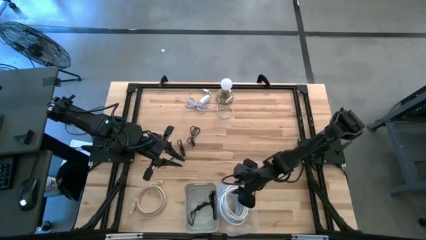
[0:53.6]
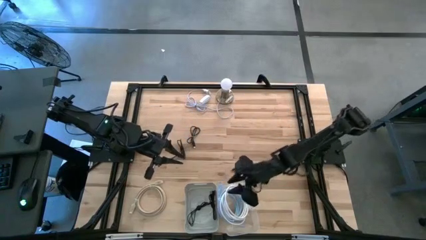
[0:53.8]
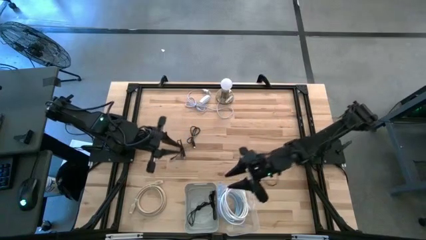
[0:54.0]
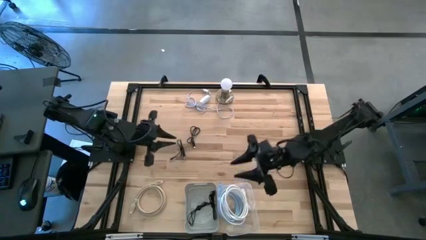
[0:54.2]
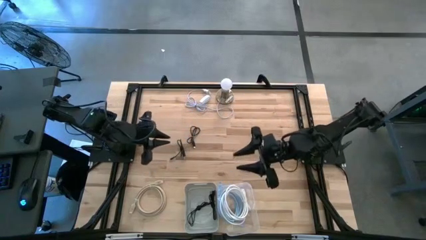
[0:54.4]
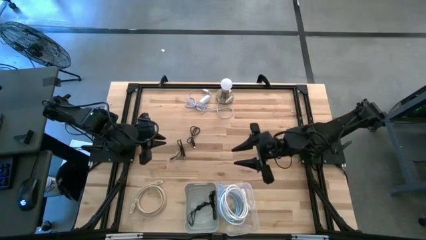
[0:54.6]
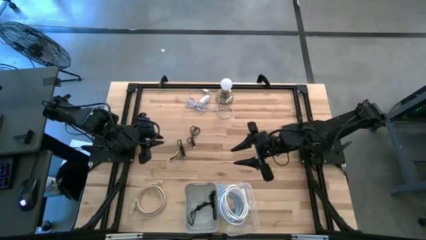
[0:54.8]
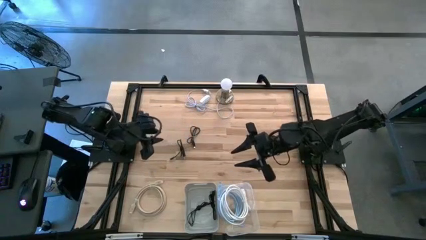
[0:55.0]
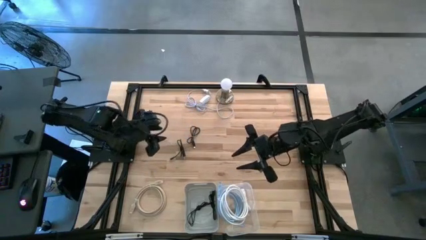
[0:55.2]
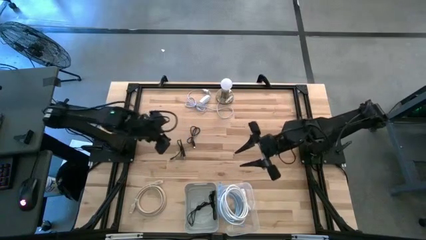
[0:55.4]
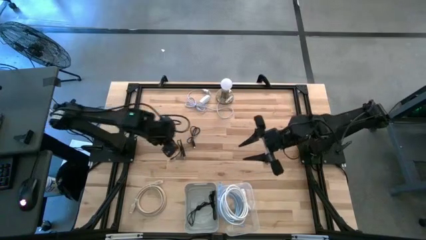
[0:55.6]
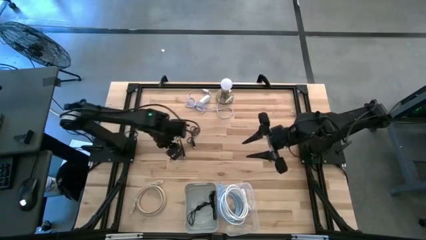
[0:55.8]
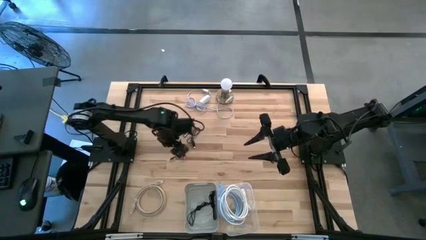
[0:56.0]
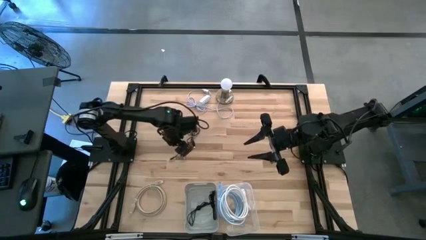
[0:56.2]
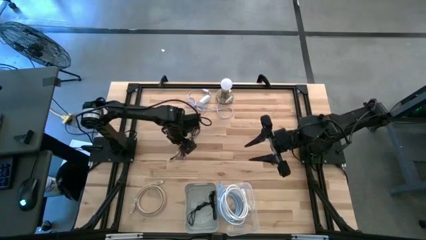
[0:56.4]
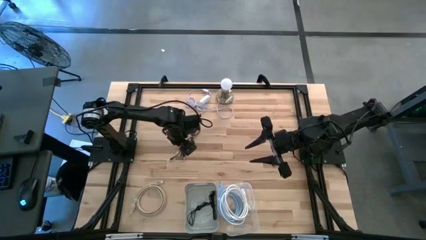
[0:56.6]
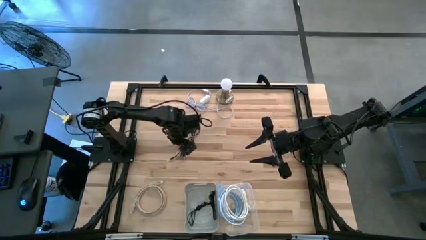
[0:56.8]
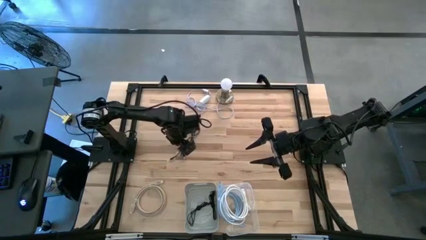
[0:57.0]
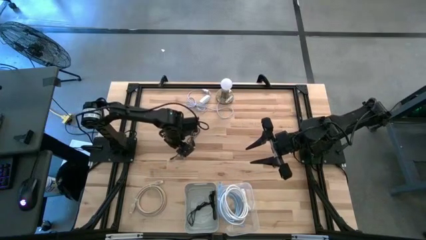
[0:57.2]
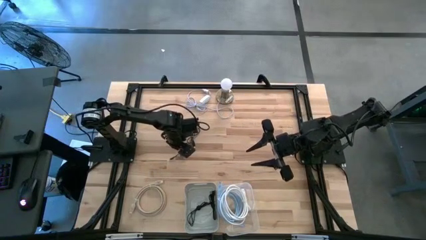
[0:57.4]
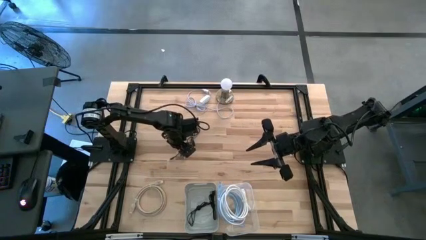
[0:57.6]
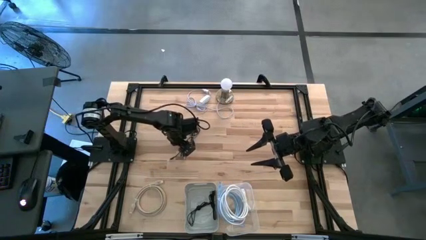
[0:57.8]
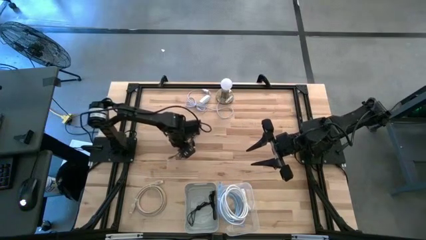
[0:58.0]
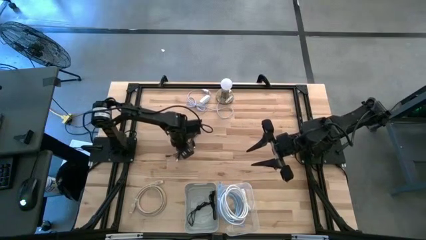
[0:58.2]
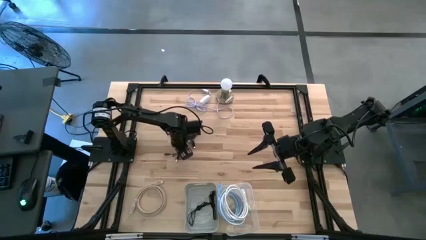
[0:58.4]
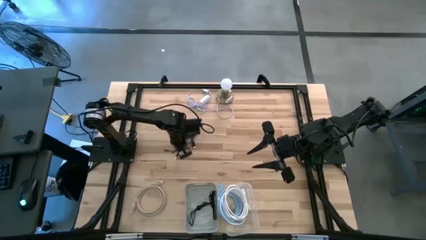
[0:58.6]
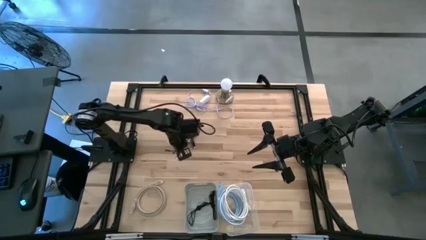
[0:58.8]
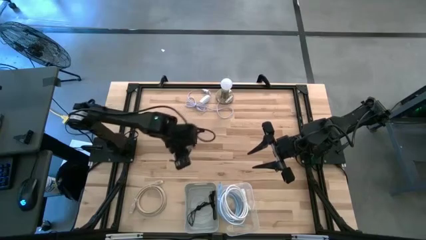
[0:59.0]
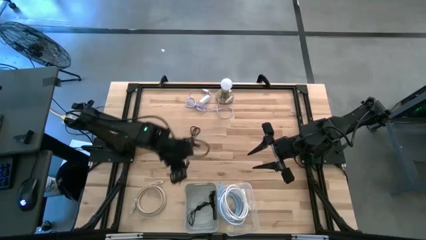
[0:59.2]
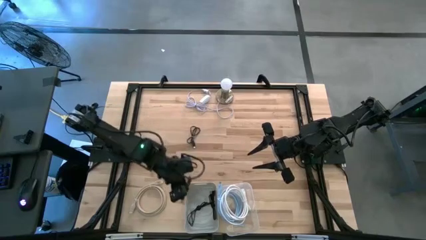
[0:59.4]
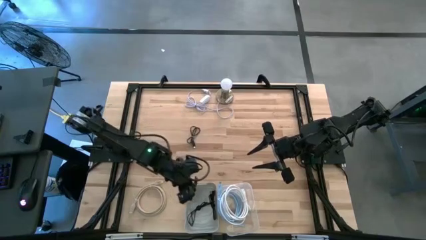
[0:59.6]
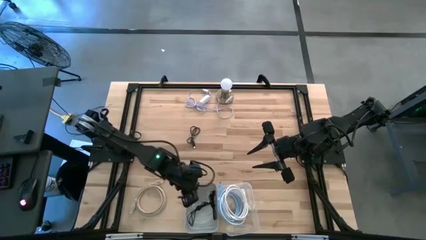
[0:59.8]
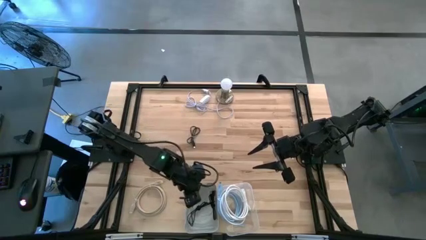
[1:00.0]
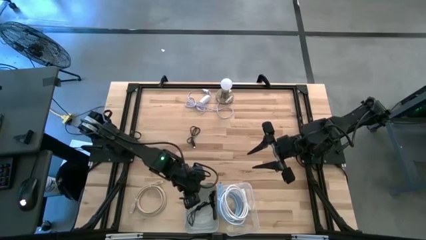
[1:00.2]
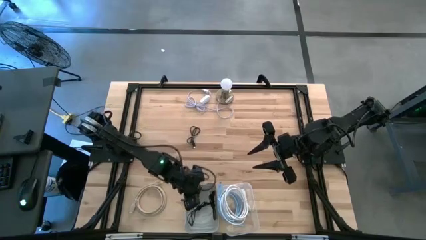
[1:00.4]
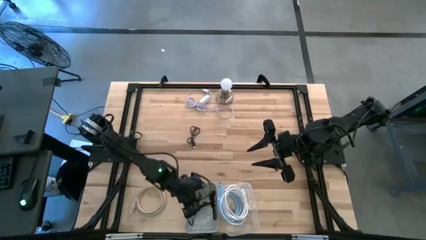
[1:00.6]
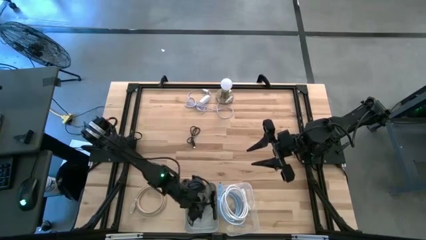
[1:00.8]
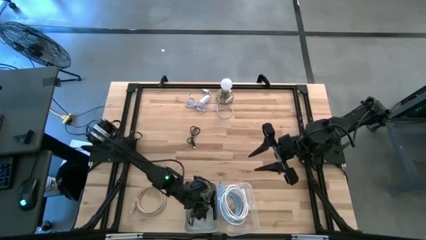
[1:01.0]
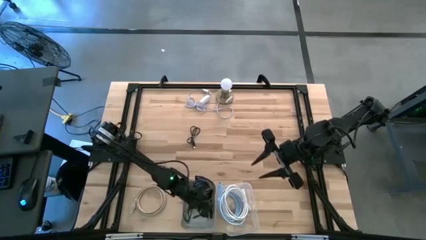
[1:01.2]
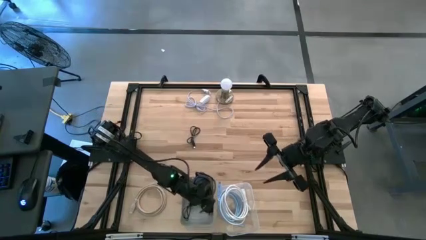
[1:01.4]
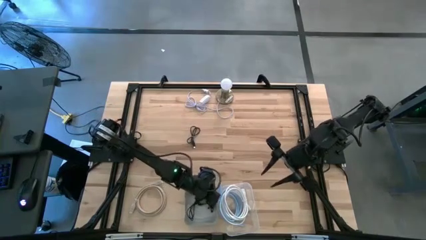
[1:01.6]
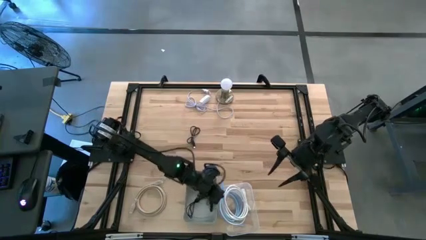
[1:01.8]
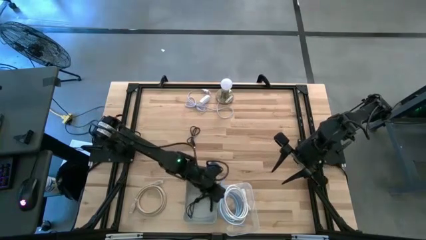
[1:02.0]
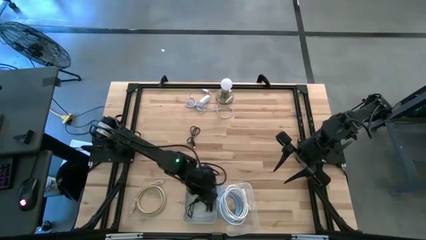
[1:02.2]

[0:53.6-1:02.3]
Task: Pick & Place USB Port
Put the black charger cable into the gray bin

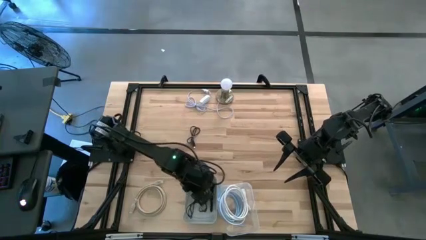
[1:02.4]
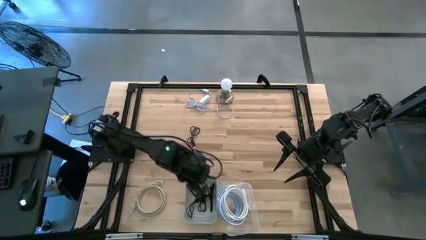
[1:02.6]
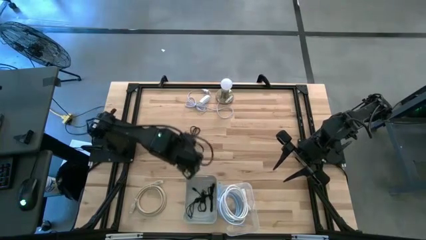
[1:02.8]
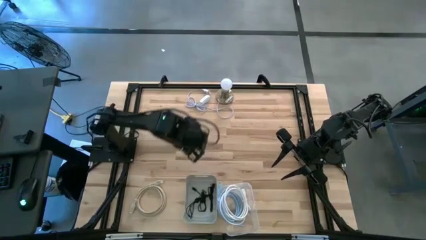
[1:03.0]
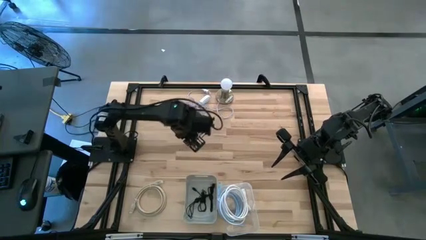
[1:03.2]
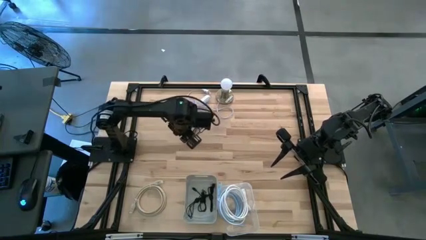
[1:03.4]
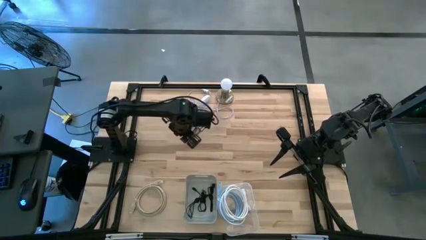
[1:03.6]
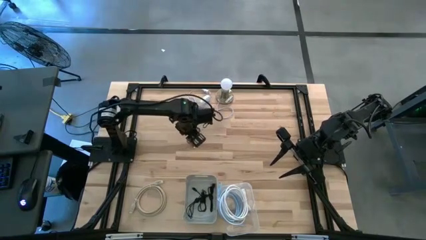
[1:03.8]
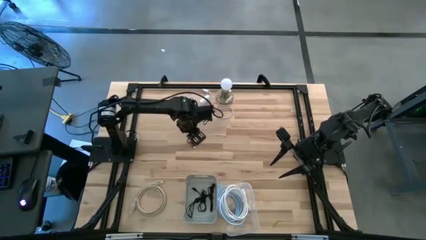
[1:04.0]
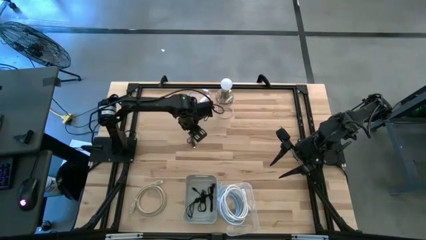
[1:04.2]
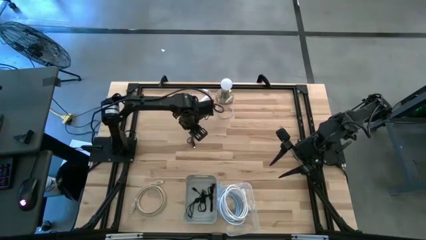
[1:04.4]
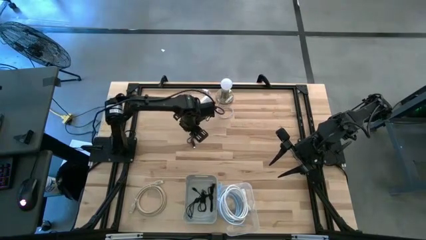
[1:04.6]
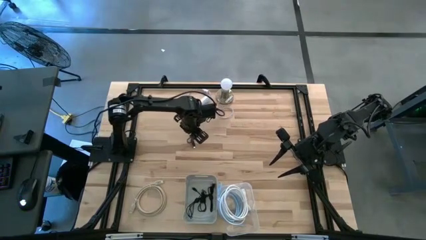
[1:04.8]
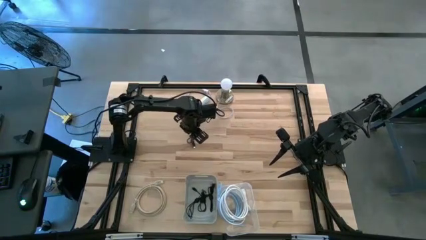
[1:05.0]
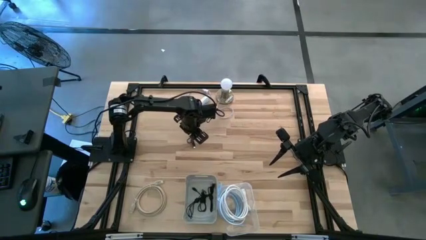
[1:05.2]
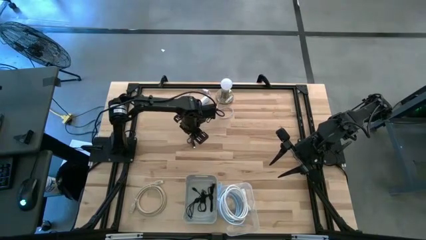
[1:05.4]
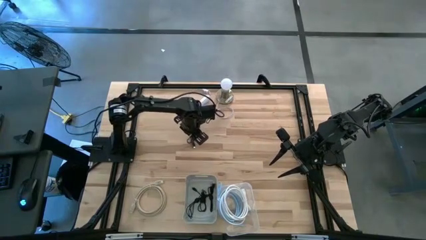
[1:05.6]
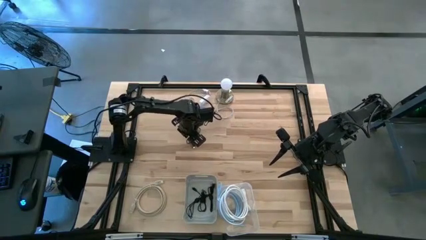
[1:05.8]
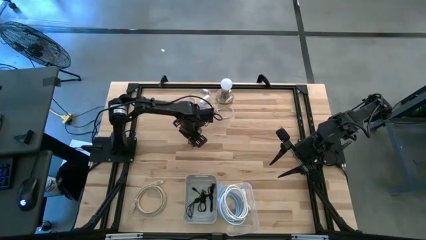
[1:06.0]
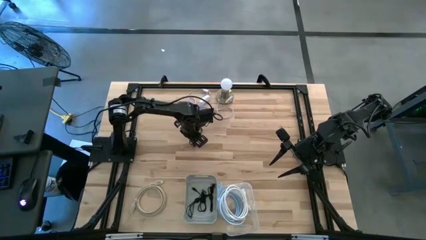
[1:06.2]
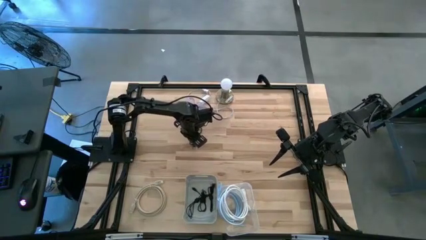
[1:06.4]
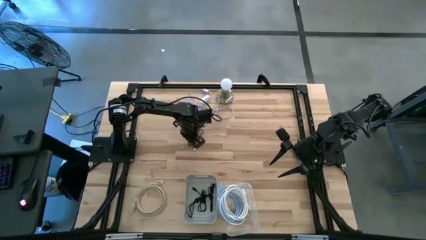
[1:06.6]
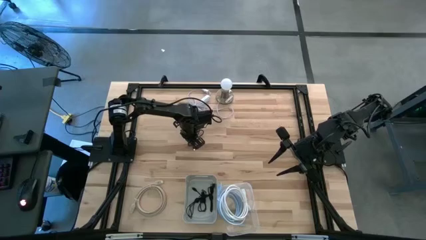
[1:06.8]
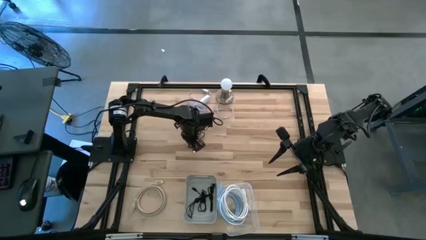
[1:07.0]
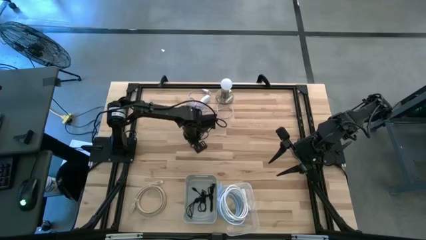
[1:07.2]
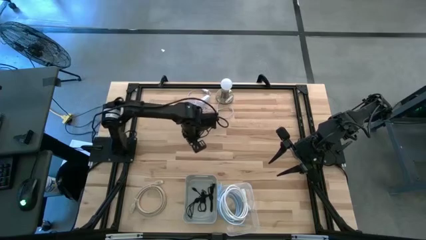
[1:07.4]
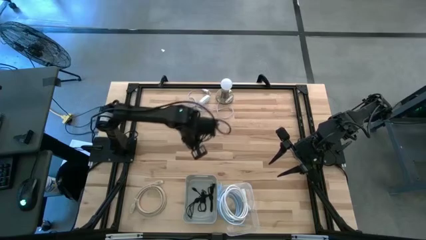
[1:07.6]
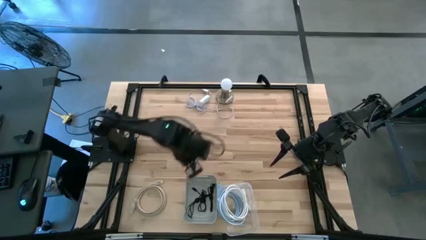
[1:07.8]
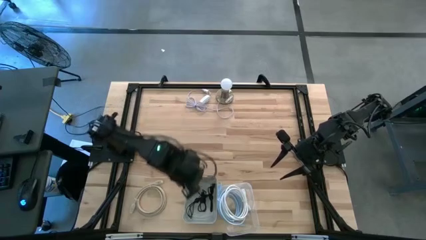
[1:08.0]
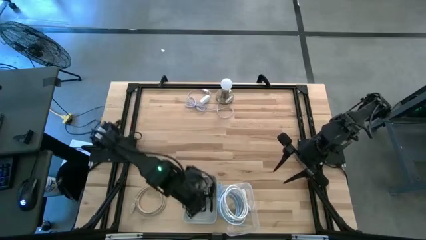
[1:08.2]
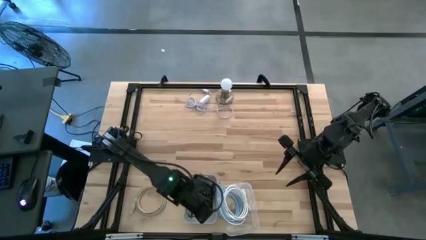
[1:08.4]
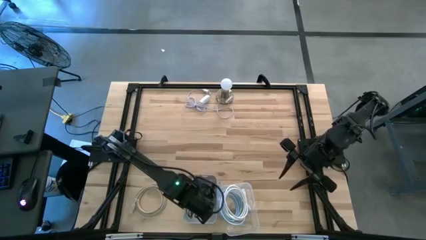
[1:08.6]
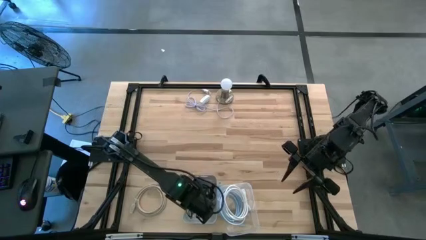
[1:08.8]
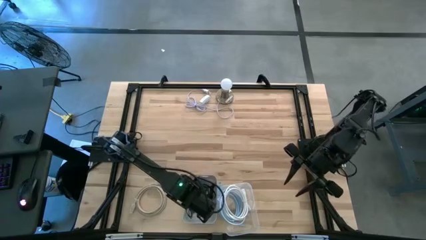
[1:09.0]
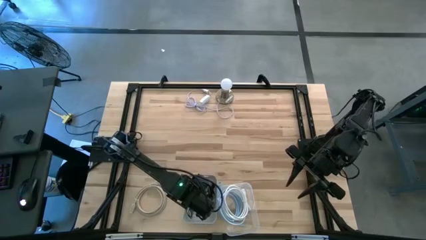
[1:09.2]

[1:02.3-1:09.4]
Put the black charger cable into the gray bin

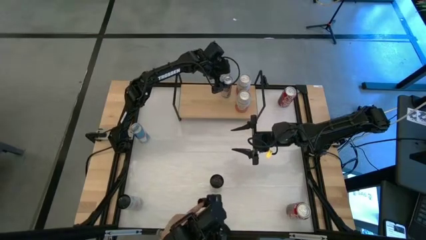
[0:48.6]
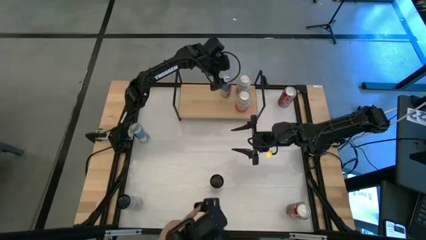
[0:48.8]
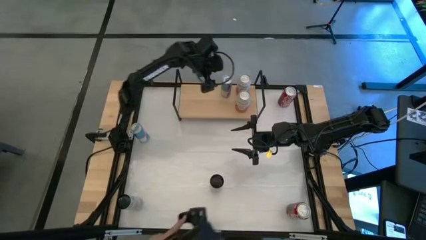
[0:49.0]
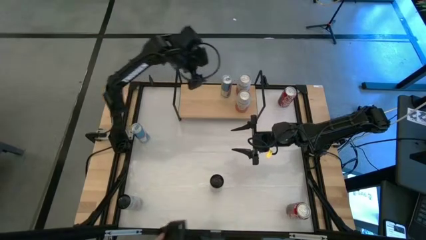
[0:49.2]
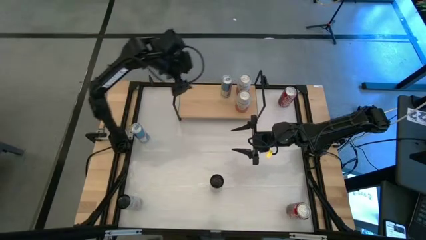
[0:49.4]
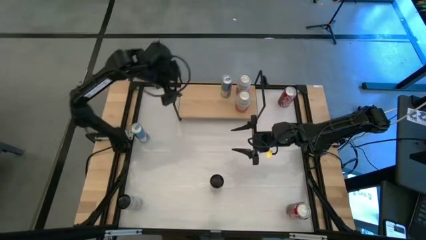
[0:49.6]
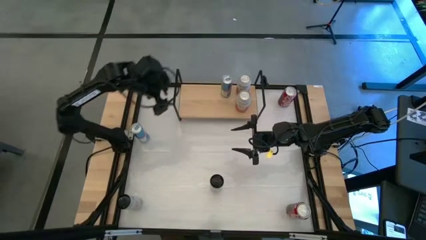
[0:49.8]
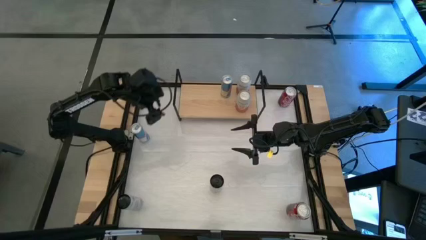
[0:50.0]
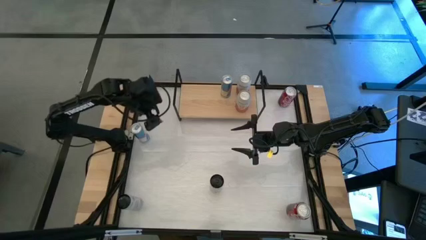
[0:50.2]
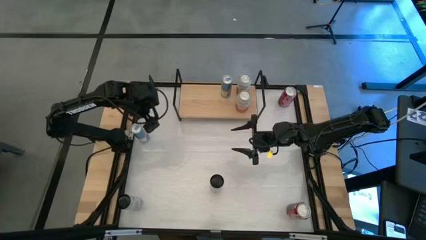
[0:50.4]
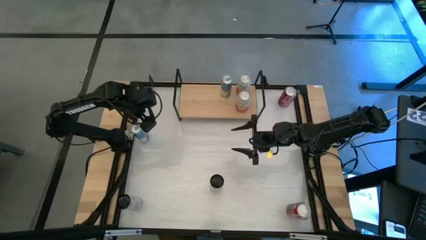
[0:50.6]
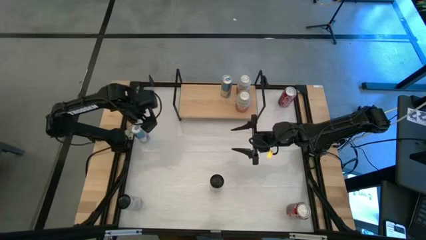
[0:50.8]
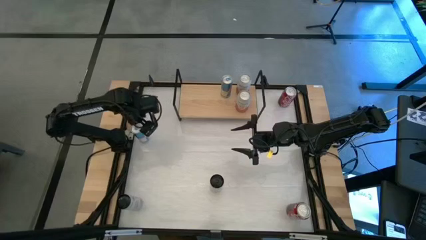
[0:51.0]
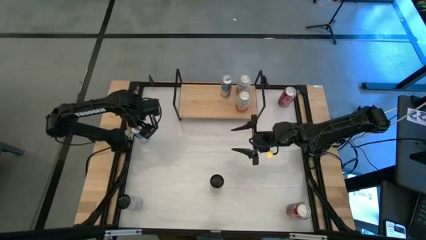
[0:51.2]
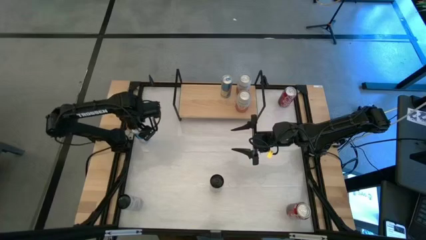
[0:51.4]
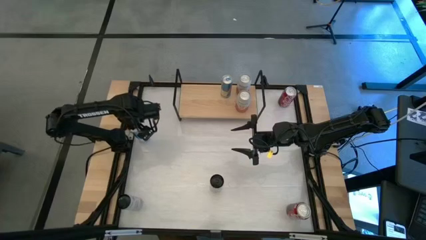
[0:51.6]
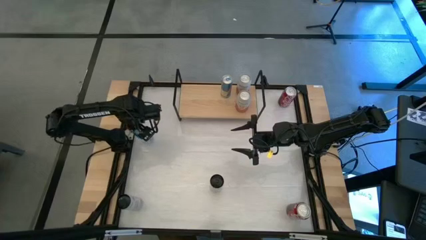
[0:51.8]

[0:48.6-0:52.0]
Task: Place canned beverage on shelf
Put the blue soda can on the shelf
